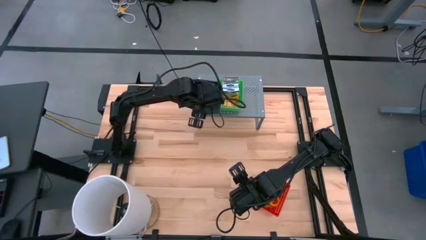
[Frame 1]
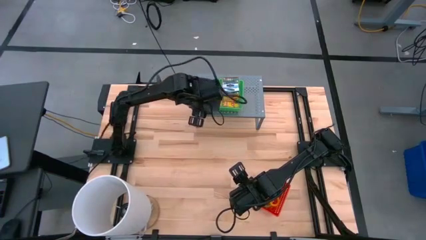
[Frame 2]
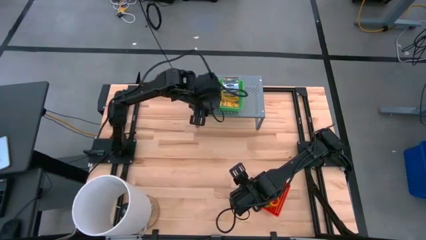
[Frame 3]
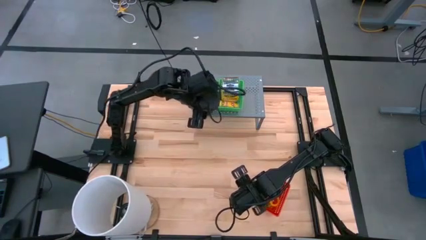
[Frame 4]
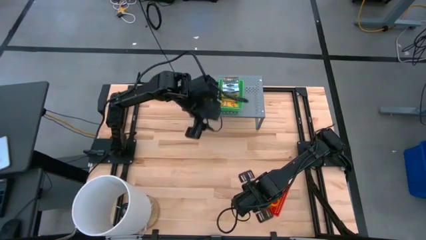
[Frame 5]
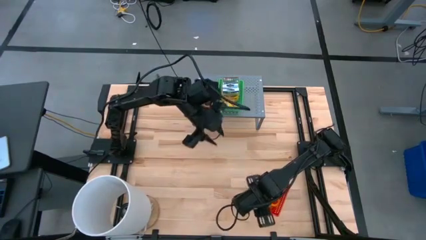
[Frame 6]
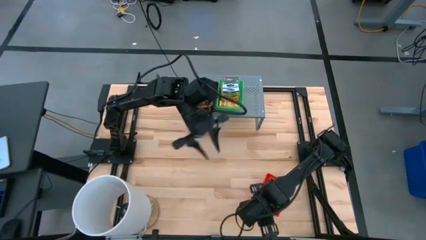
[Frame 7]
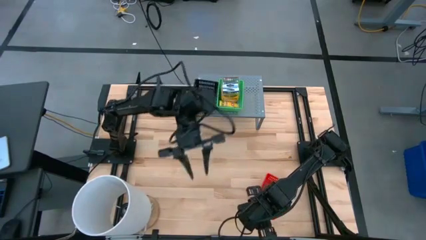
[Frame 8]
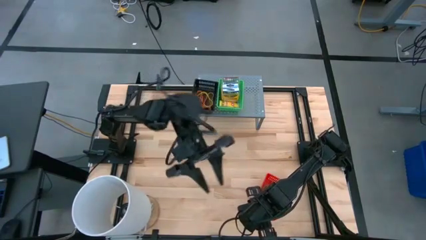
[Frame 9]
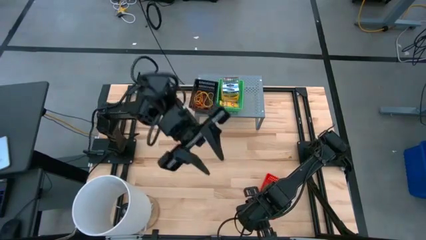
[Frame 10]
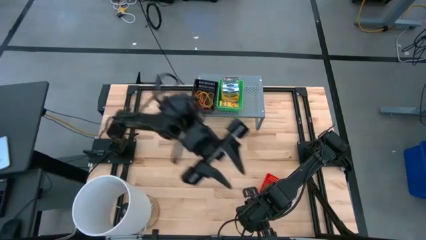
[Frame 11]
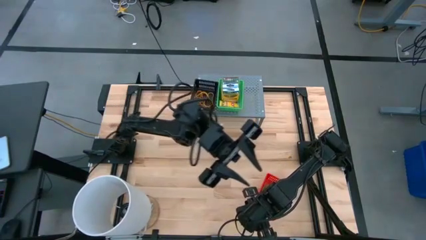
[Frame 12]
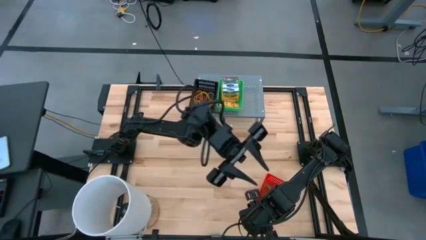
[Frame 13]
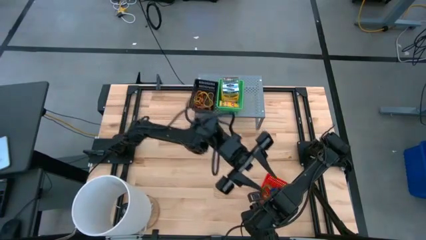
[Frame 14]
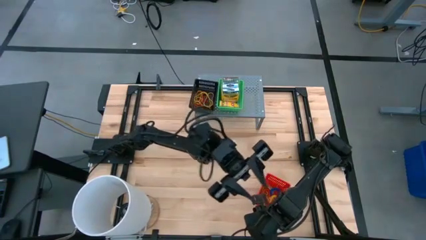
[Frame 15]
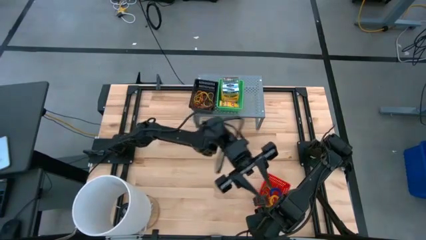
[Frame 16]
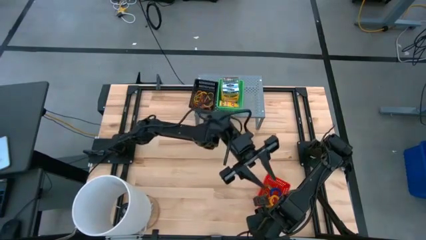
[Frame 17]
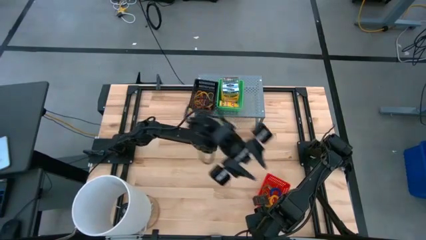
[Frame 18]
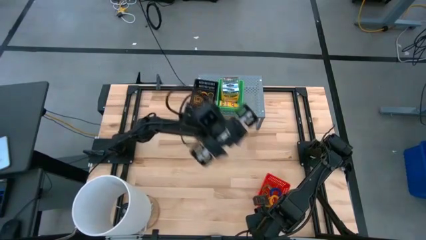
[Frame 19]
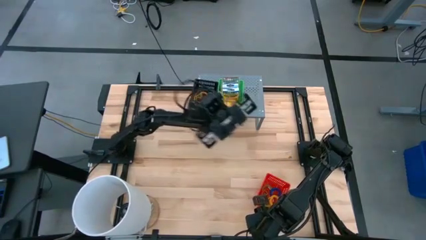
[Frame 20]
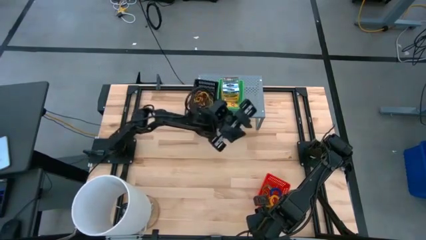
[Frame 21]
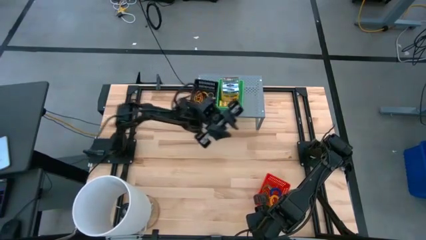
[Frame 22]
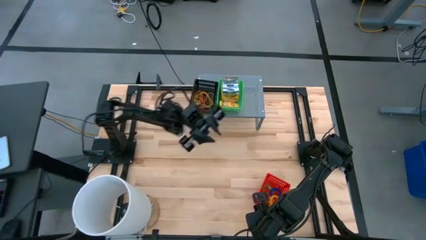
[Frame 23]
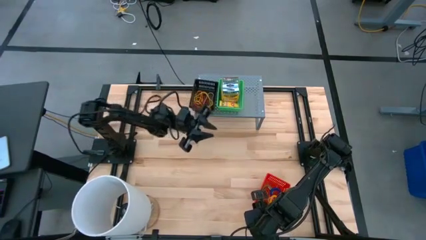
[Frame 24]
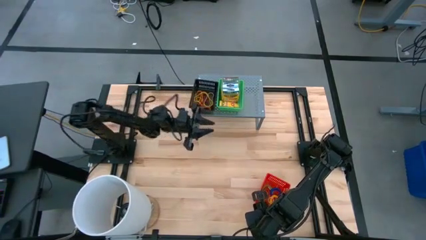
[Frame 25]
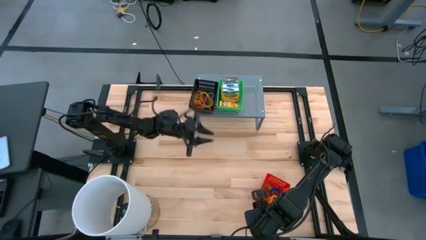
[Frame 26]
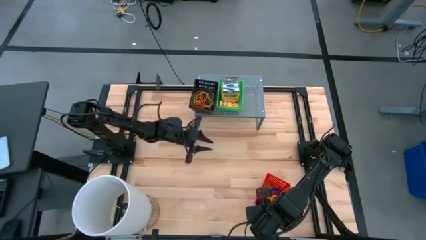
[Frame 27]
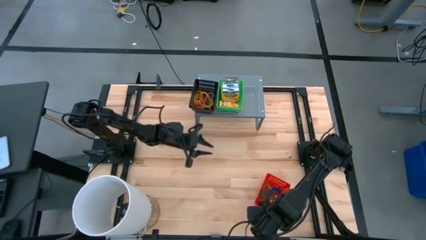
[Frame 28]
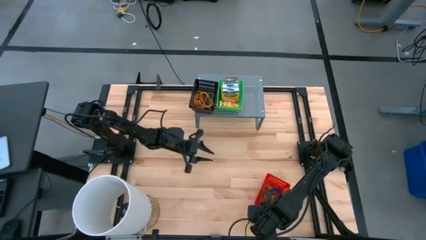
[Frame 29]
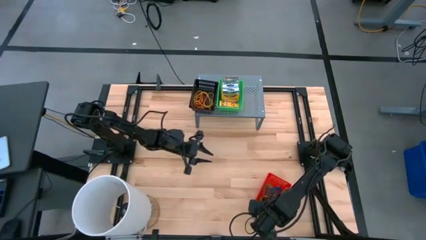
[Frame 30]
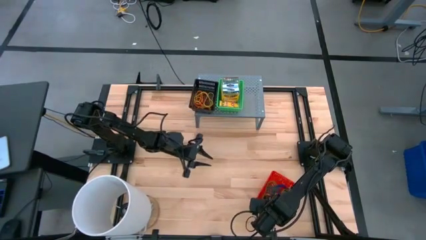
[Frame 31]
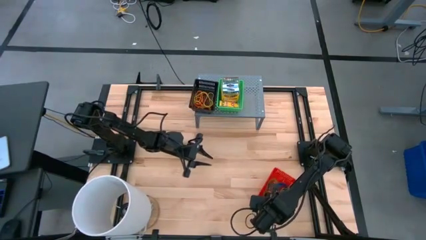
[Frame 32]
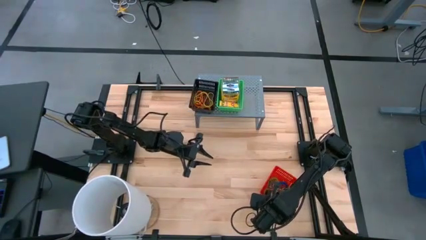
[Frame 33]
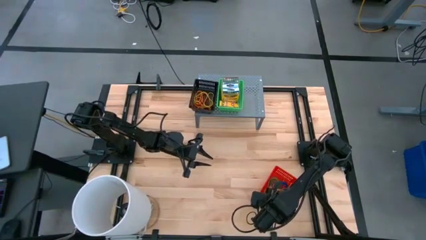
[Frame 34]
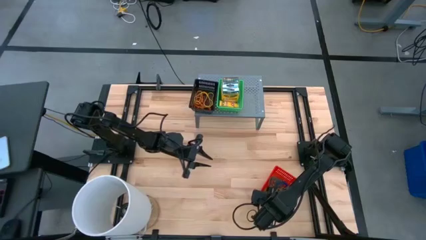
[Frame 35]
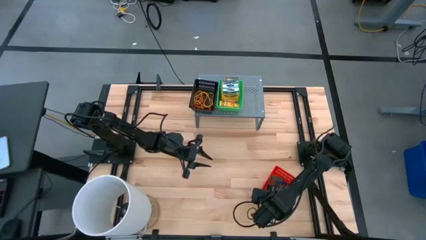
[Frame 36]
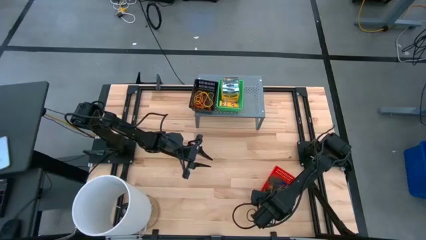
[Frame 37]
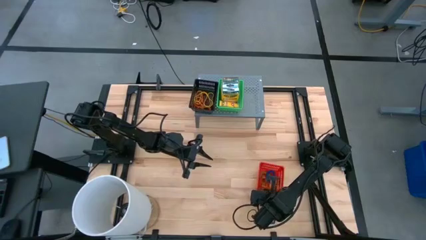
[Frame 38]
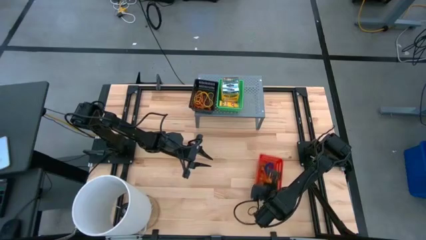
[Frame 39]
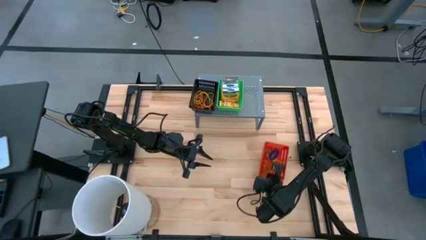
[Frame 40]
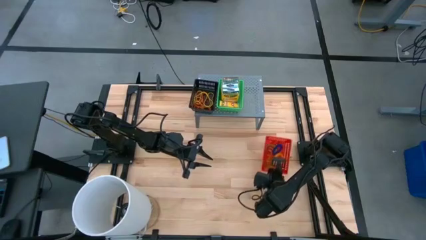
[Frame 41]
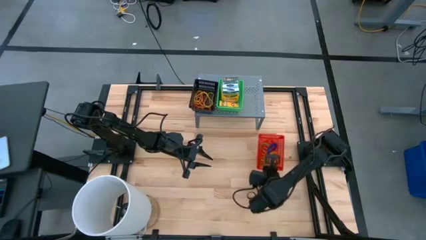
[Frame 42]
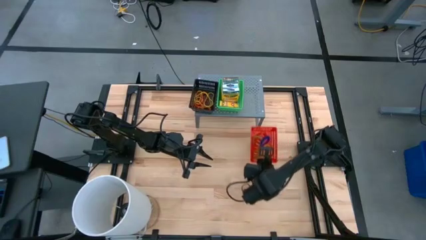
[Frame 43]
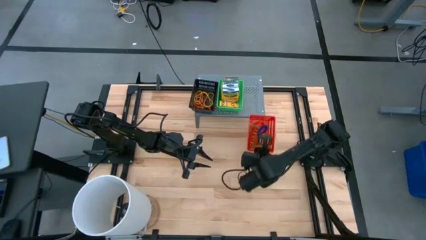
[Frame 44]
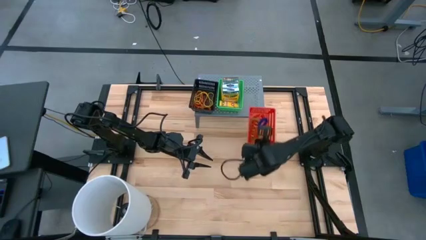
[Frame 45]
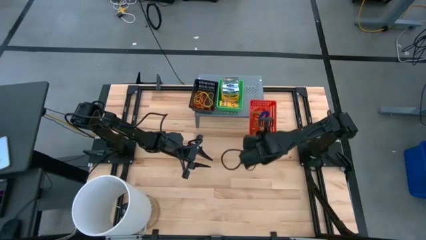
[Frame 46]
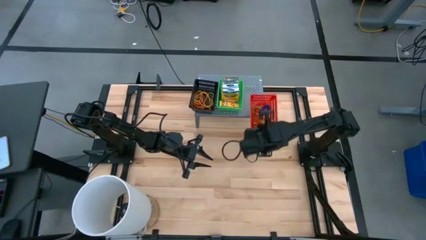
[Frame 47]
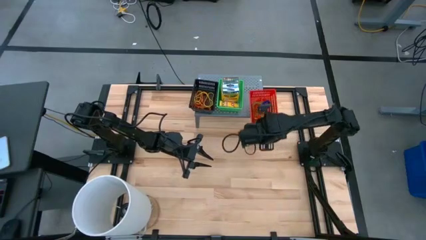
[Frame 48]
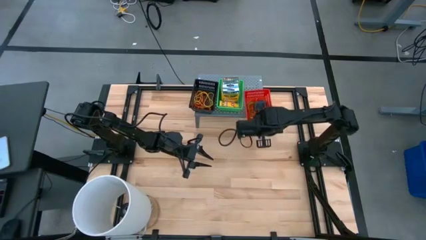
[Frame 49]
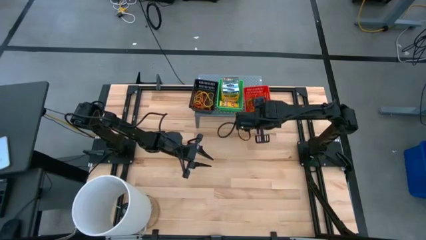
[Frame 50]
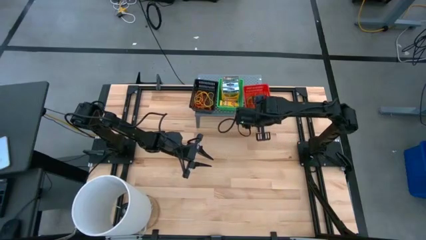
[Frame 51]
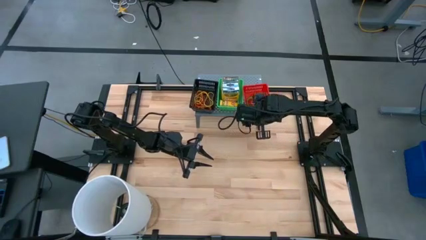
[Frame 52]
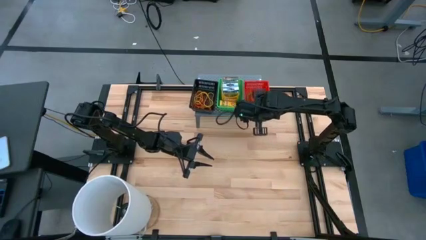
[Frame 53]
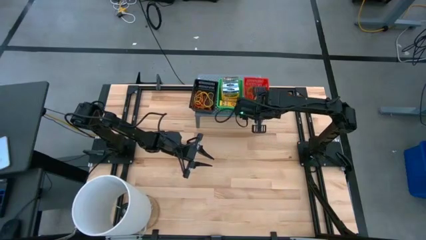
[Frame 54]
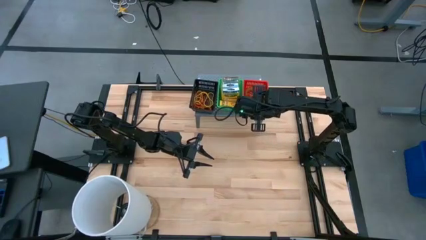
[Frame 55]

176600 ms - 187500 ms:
Task: Pick & Place Office Desk Supplies
Put the red bin on the shelf

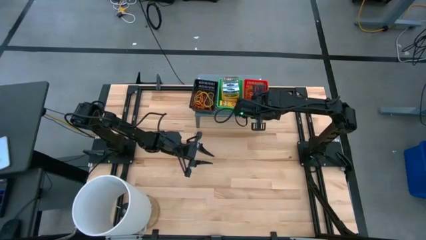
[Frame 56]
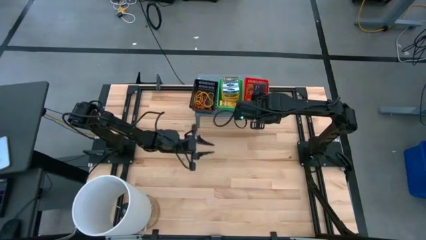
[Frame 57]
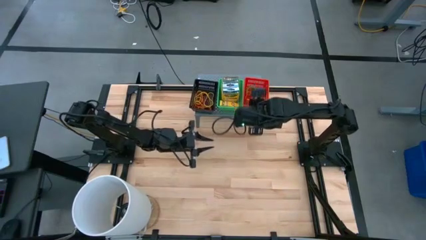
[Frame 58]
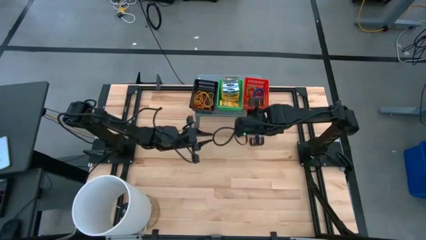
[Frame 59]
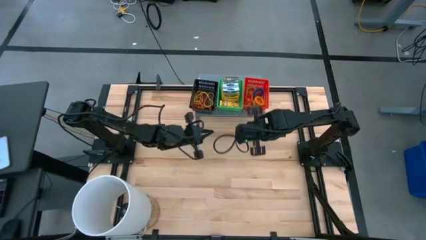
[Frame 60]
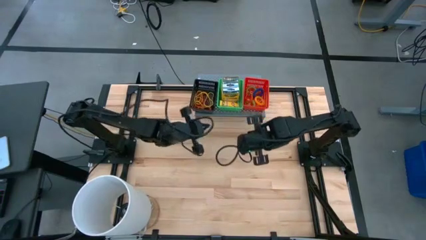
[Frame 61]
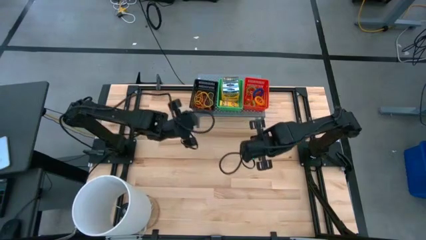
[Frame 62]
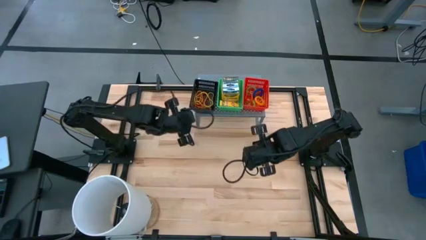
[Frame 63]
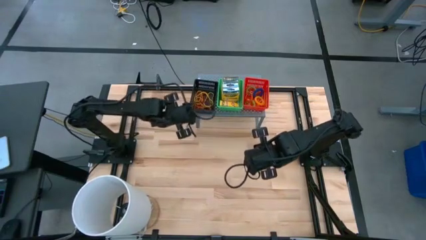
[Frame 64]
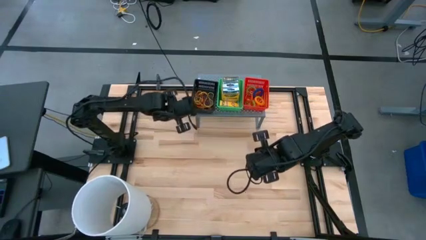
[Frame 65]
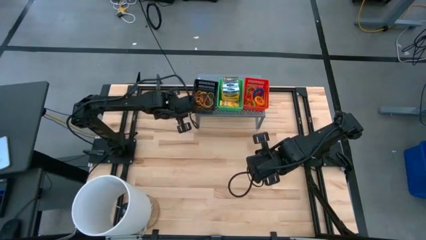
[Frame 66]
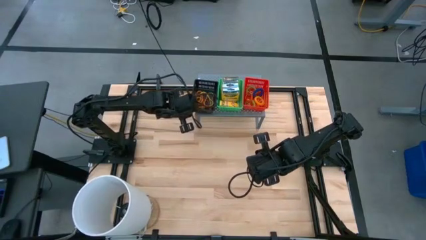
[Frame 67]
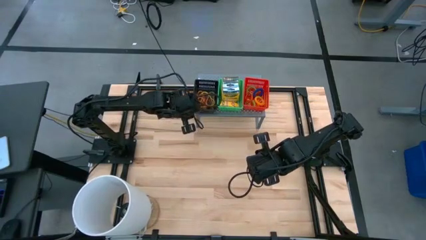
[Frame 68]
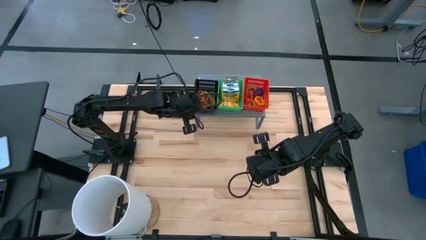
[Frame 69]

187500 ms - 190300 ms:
Adjust the black bin on the shelf

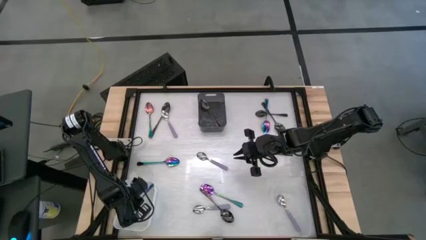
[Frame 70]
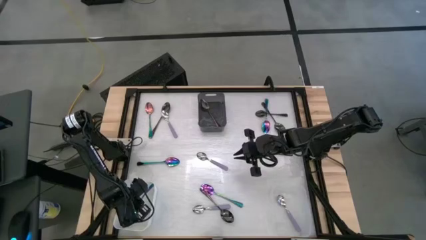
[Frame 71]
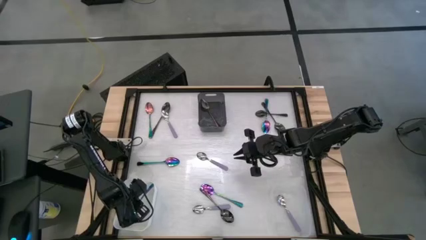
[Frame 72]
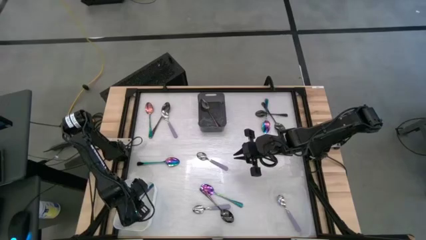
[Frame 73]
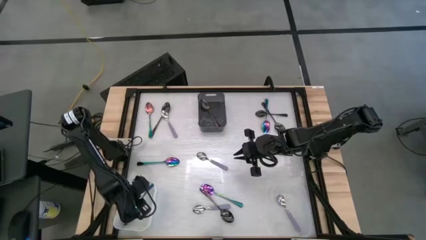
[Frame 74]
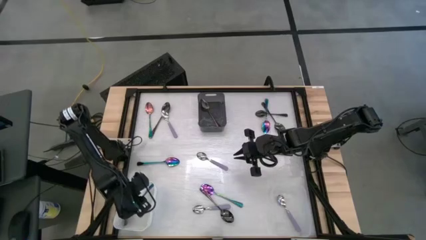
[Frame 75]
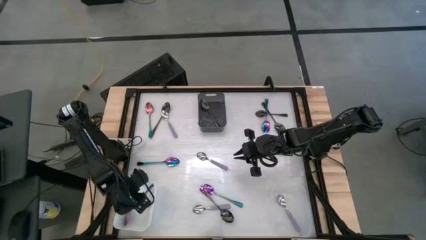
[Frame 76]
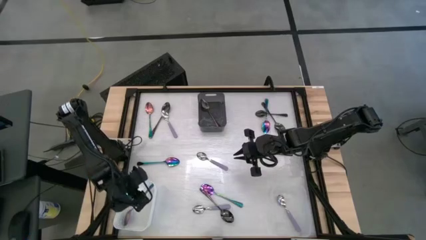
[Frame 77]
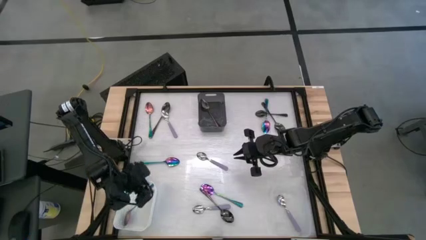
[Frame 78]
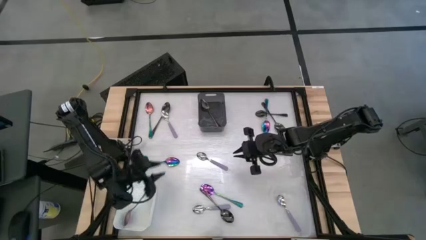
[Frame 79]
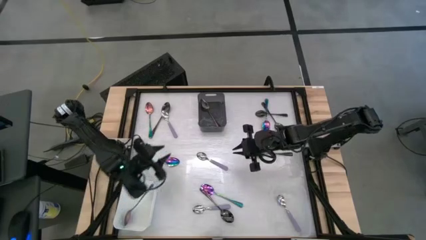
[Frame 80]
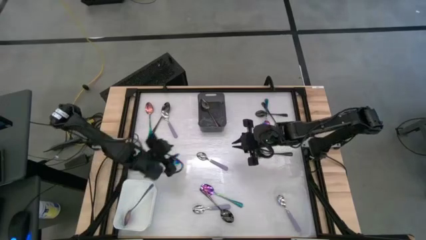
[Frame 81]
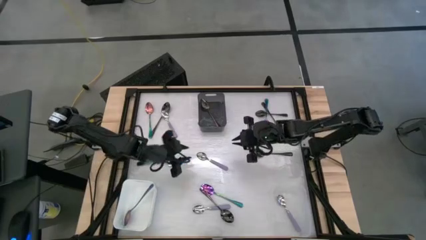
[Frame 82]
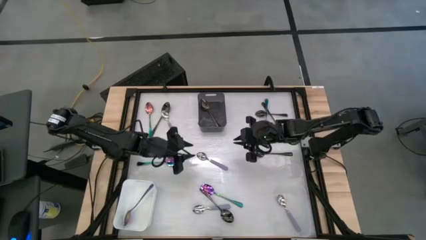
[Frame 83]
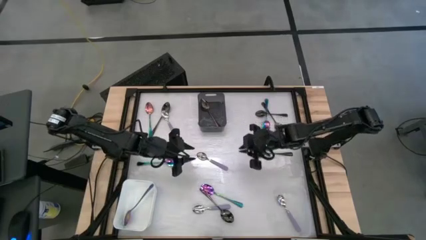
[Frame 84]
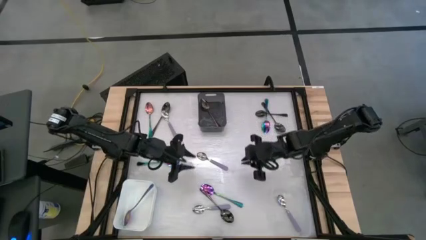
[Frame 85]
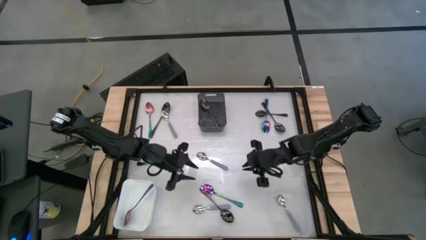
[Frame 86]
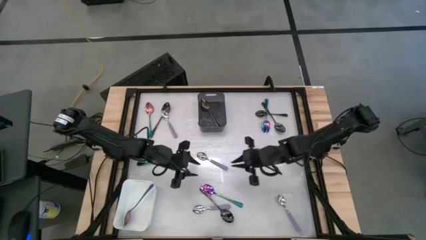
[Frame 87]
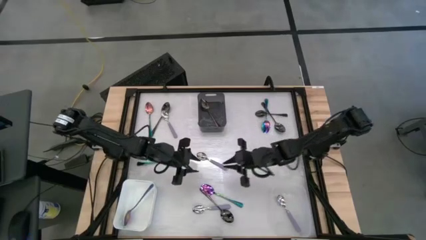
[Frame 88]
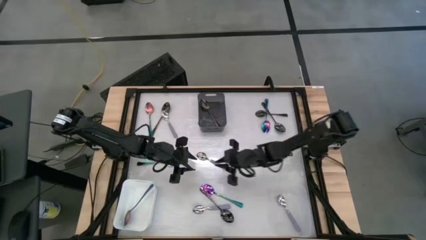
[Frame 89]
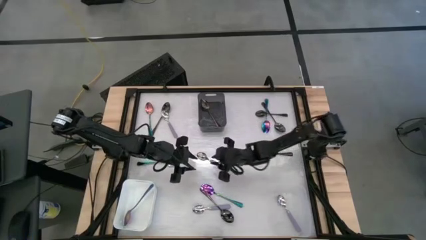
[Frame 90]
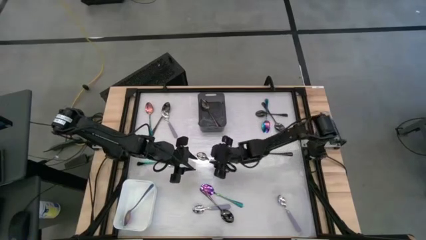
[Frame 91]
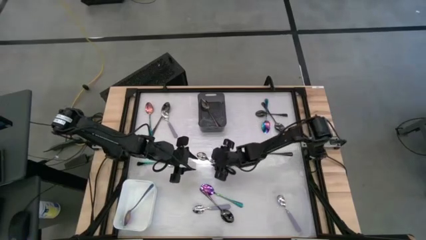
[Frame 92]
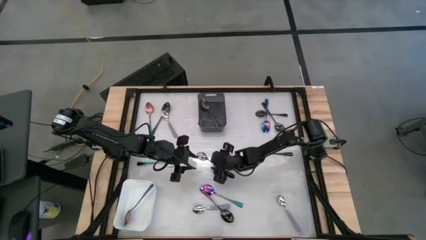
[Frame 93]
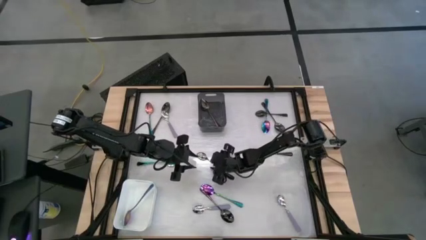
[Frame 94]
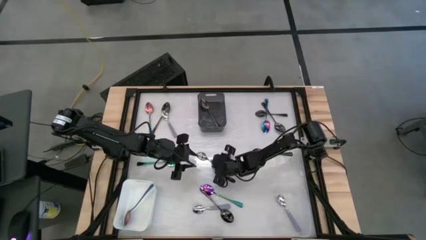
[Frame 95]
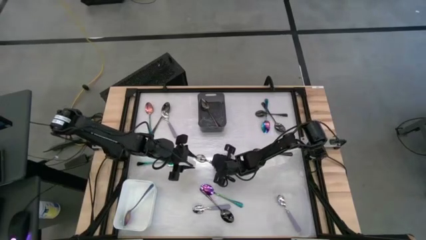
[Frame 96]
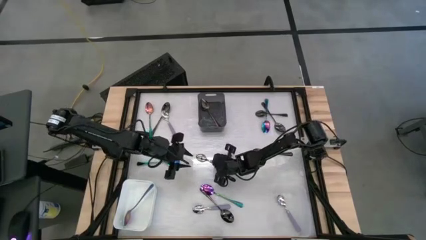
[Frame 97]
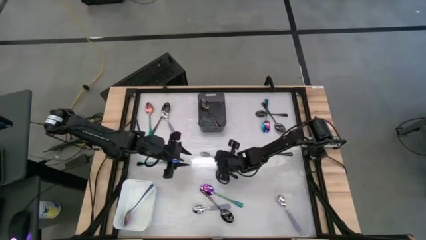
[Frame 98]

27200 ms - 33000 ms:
Task: Sort silverware by color (type)
Put the purple spoon into the transparent bin
